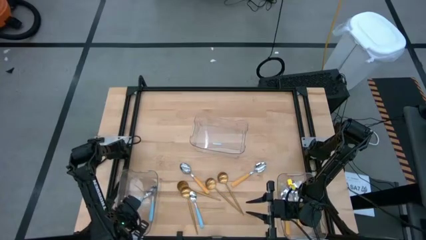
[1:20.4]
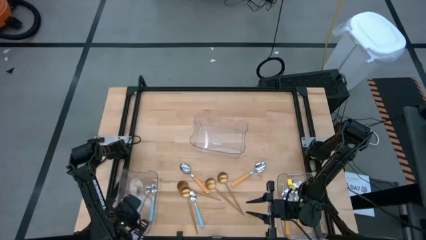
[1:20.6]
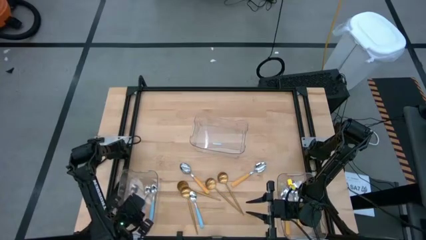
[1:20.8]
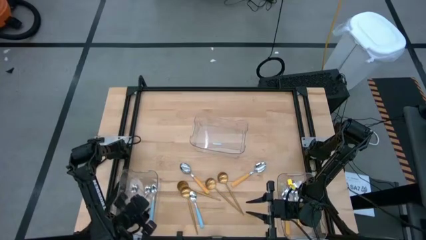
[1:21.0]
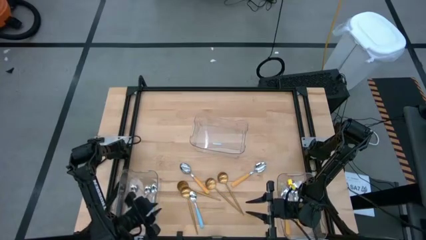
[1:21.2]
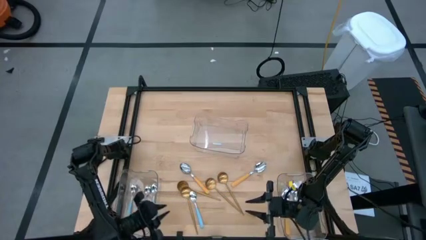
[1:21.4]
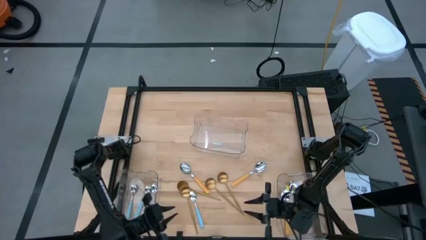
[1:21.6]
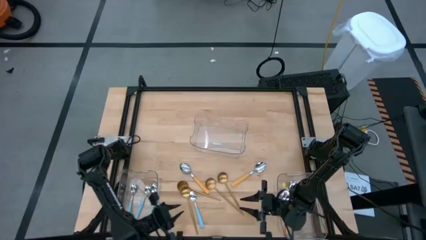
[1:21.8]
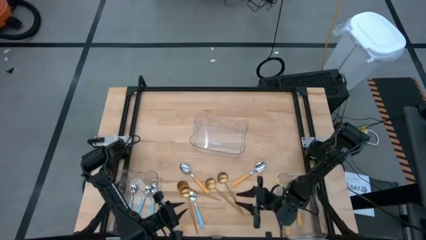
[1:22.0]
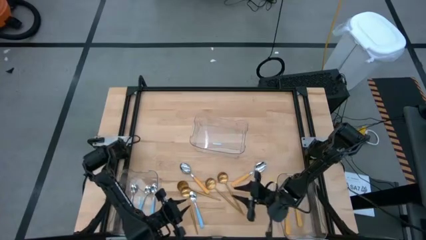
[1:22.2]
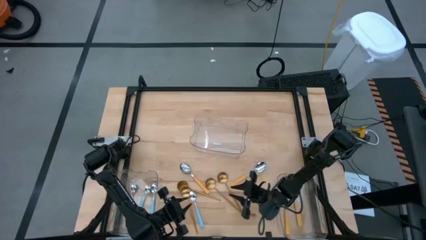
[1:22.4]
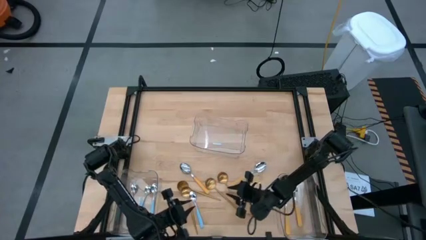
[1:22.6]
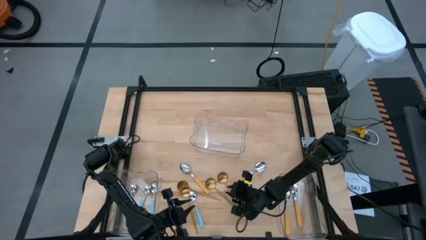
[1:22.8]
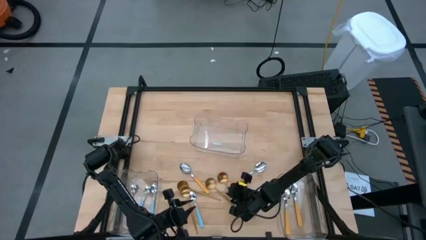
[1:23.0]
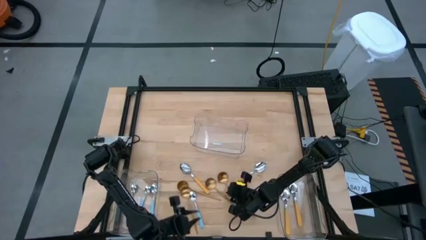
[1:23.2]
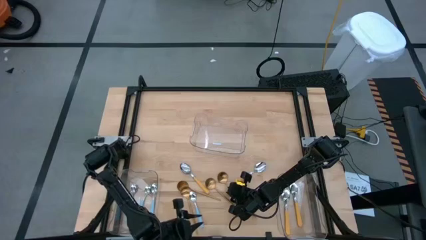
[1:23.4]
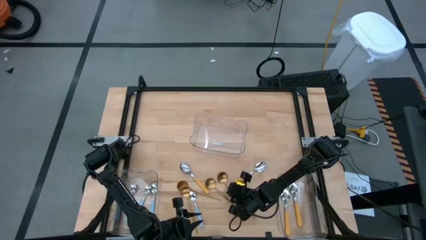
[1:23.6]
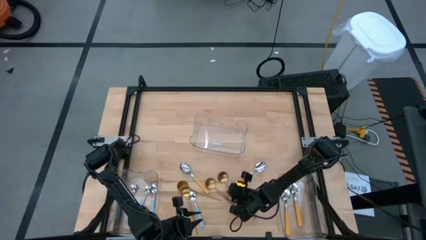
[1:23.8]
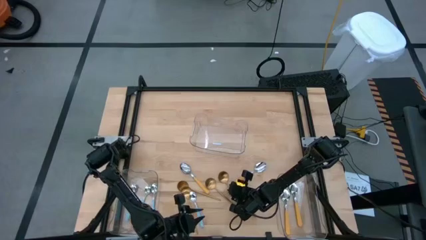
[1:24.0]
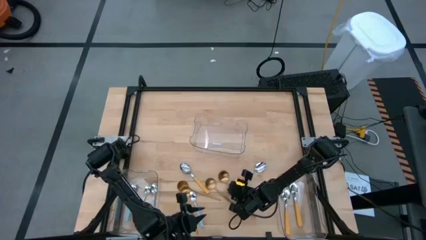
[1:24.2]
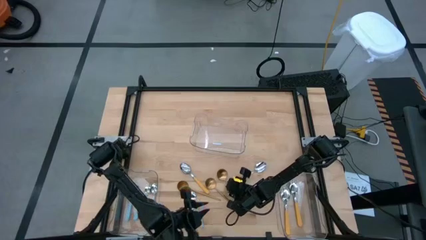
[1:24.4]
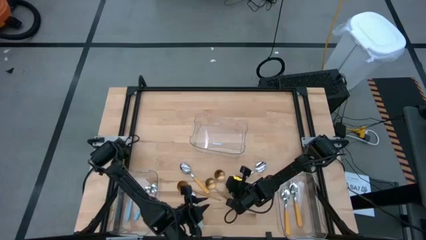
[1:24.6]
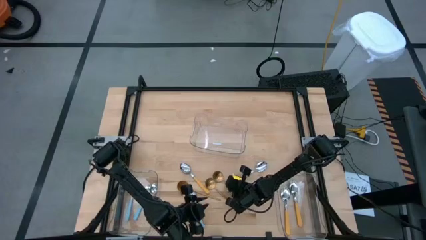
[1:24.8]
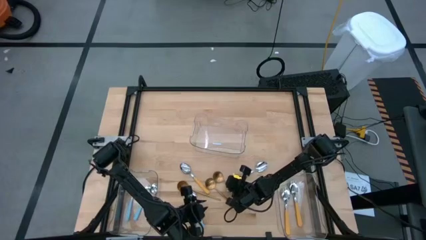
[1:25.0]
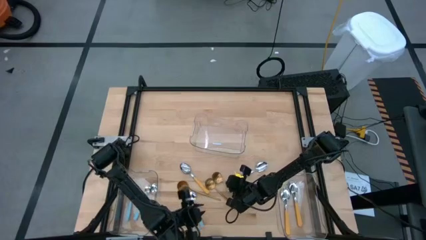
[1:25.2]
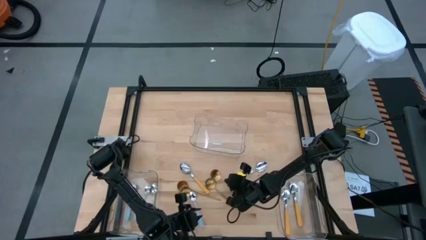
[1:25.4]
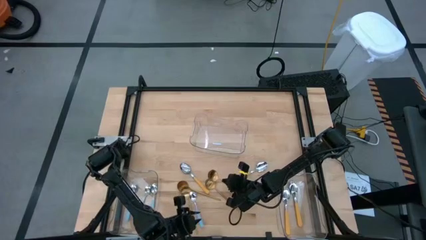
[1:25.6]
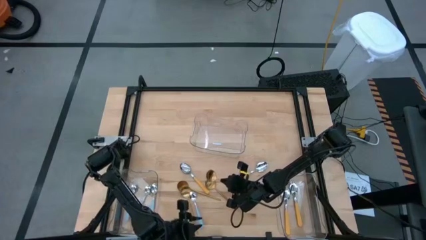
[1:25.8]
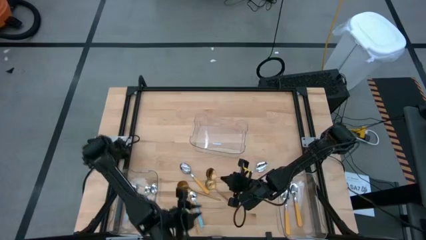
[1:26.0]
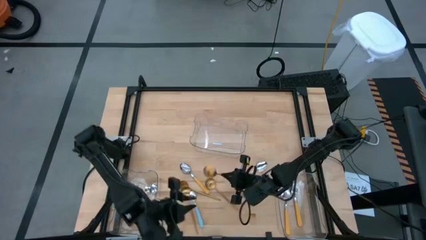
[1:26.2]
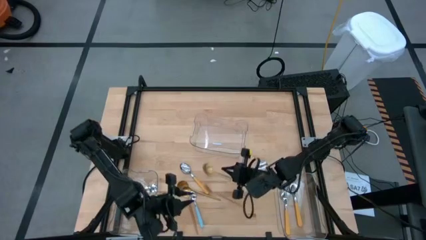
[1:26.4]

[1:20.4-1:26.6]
Task: Sort silverware by color (type)
Put the gold spoon into the top transparent bin

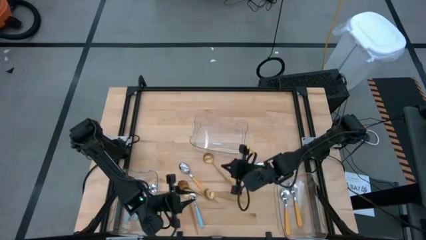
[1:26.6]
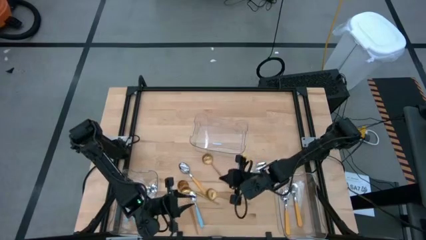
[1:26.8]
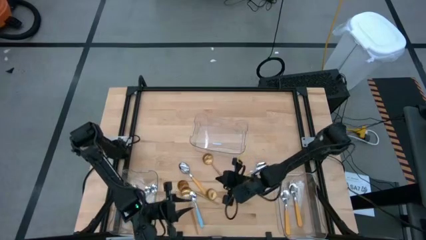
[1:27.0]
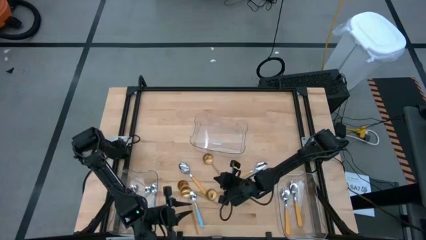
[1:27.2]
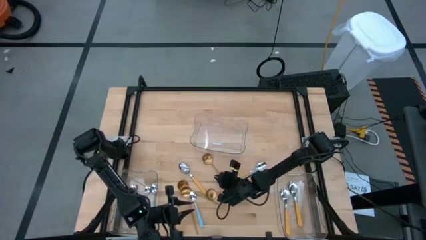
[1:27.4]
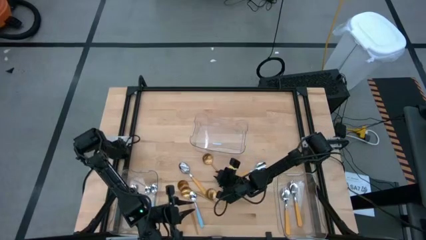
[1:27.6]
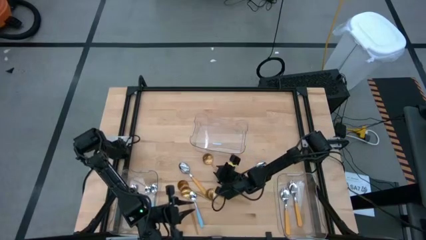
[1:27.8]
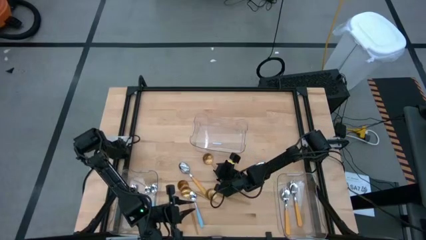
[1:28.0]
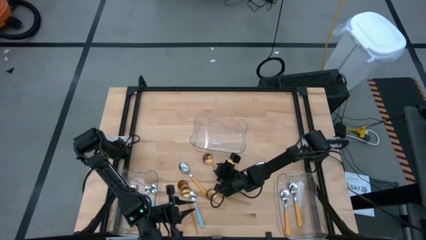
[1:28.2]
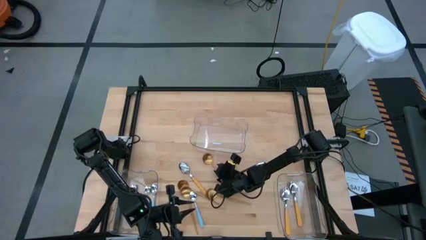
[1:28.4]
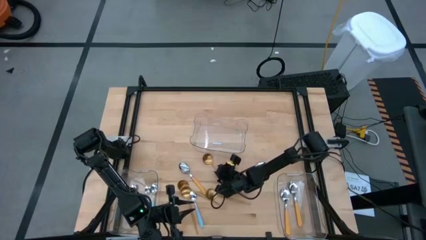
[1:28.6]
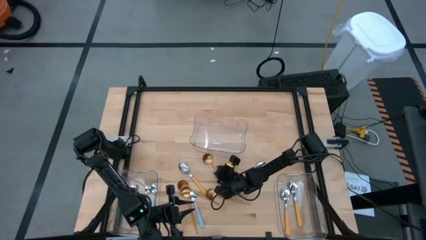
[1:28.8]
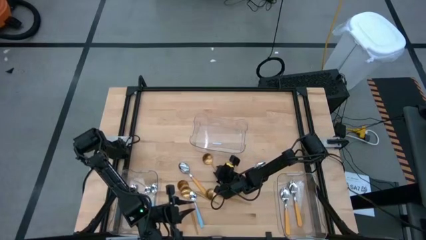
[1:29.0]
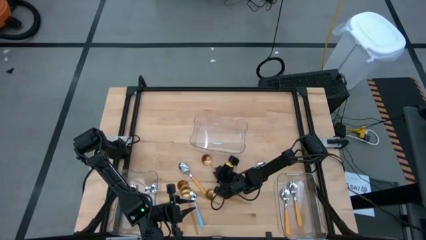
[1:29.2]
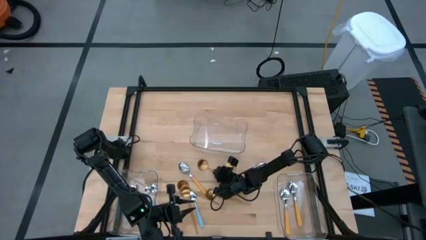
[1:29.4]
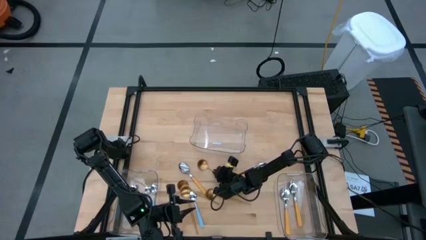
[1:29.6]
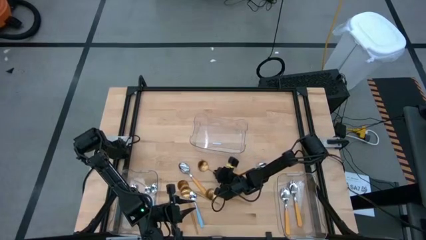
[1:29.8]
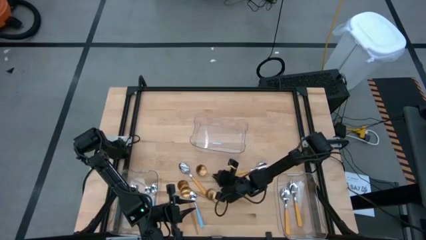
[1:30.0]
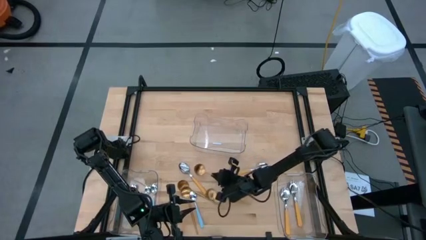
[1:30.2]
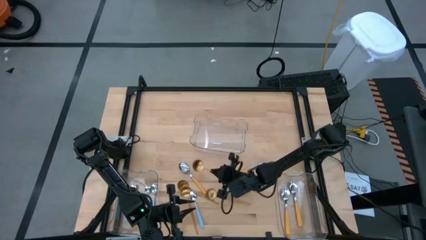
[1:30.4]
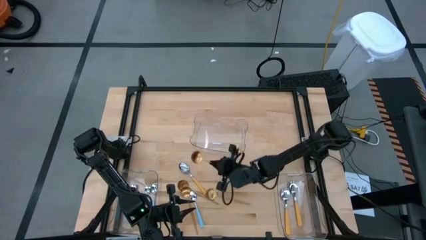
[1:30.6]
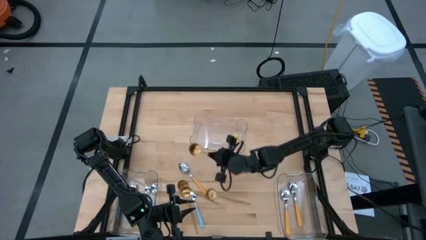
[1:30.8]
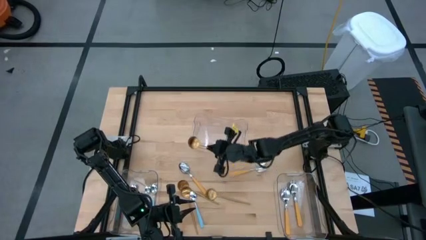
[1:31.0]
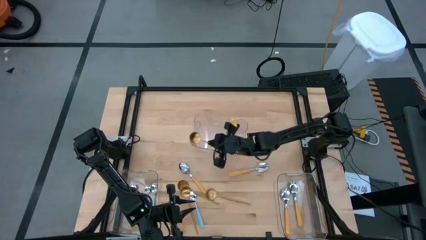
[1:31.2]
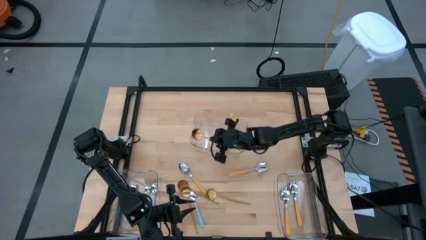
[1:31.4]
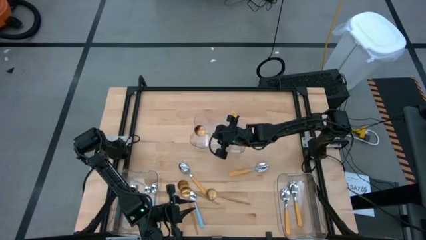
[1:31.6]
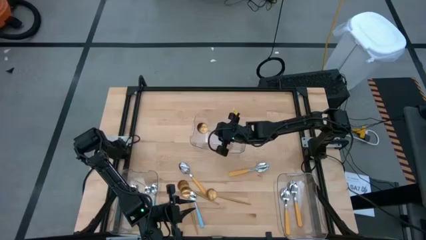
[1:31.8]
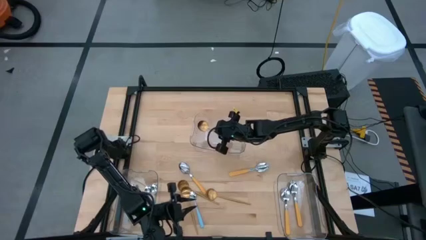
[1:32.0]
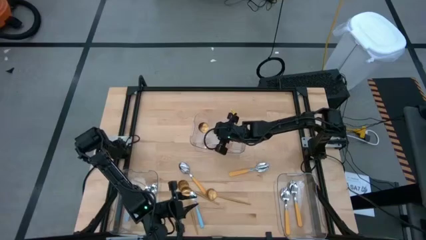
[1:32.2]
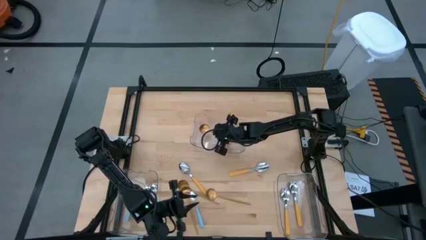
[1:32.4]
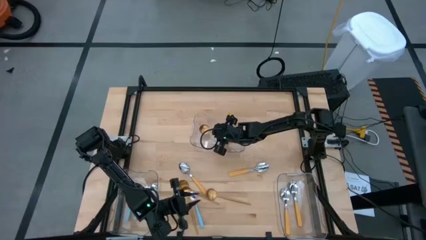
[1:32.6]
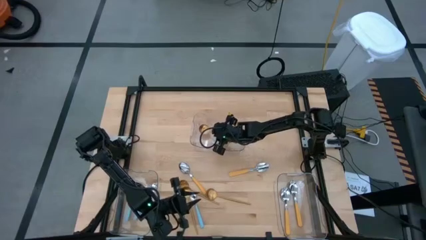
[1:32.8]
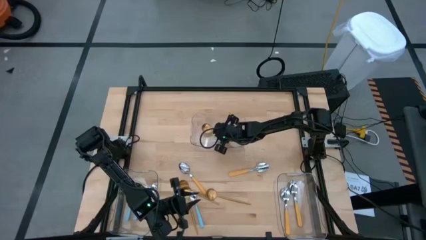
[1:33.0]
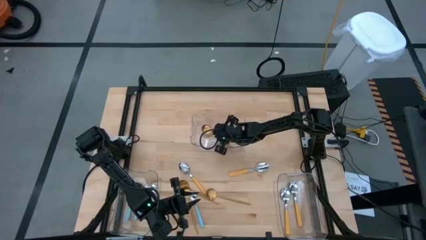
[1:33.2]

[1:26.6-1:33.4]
Put the gold spoon into the top transparent bin

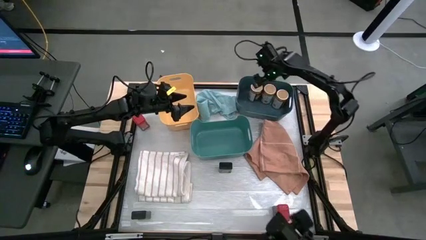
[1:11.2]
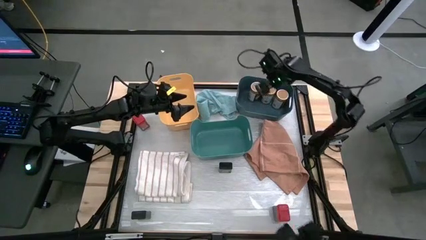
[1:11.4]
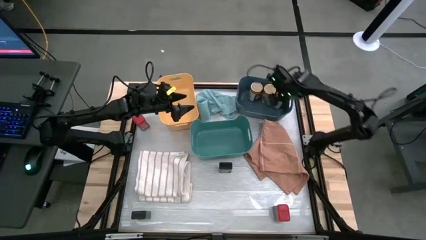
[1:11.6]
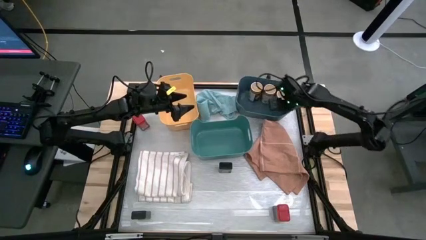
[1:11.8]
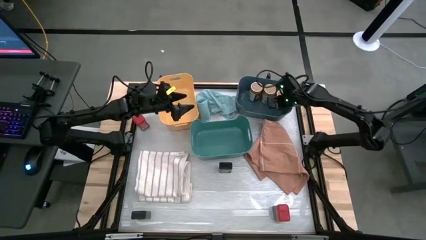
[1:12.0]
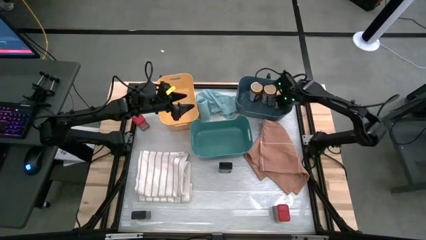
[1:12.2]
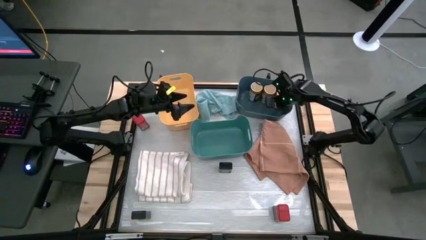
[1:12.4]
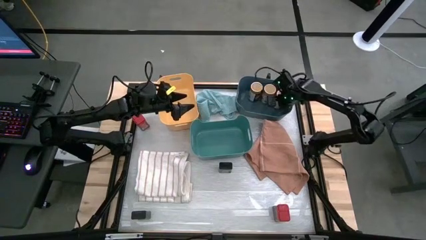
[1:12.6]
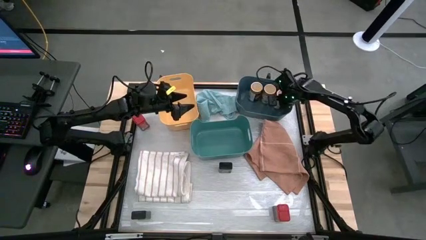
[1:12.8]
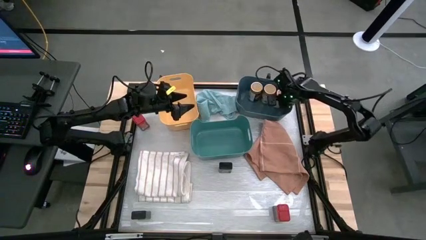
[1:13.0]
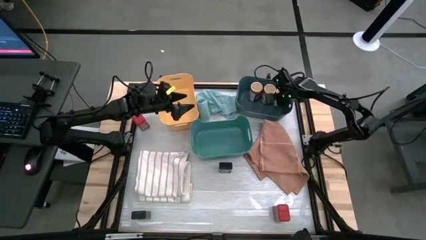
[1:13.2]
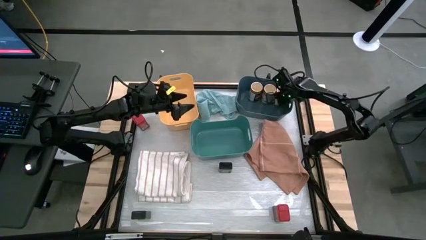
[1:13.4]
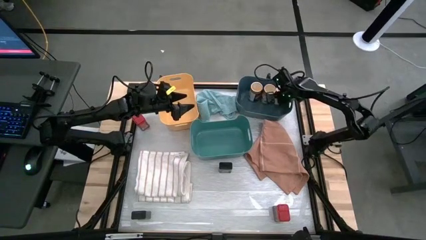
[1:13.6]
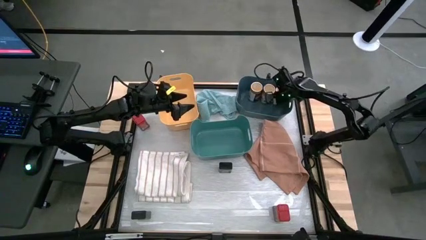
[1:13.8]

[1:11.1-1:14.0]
Task: Sort spices by type
Adjust the gold seasoning bottle in the blue bin
